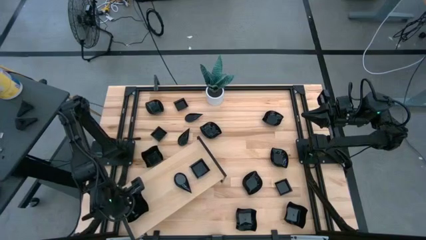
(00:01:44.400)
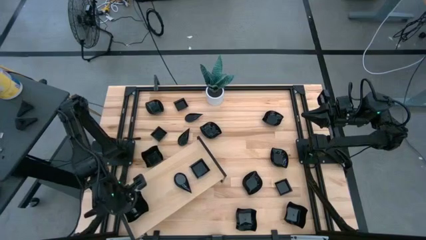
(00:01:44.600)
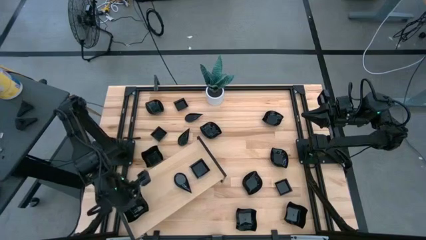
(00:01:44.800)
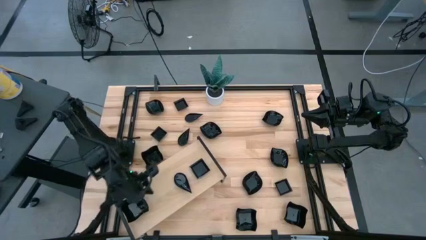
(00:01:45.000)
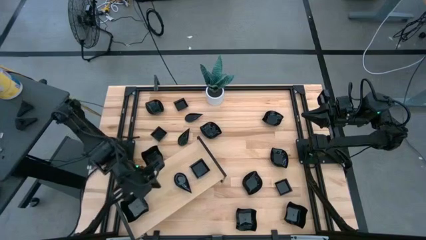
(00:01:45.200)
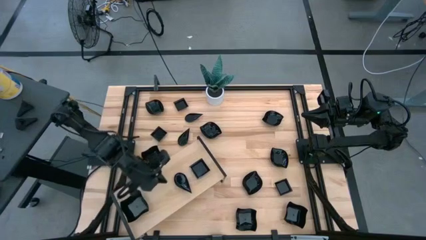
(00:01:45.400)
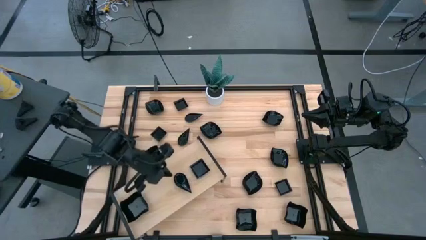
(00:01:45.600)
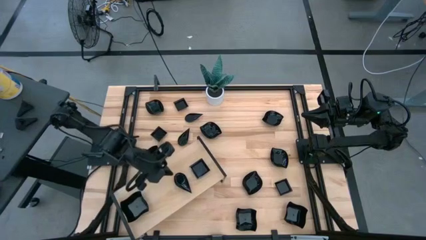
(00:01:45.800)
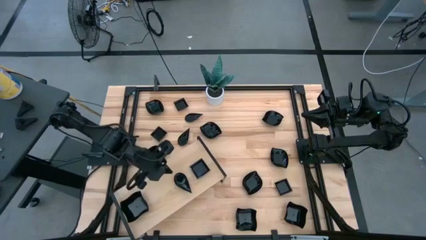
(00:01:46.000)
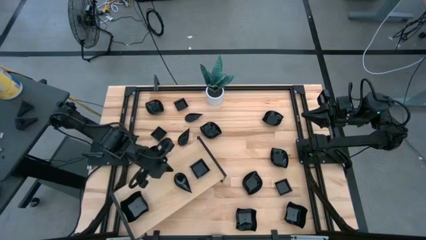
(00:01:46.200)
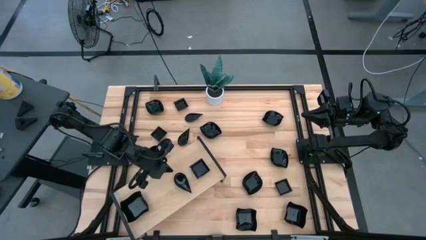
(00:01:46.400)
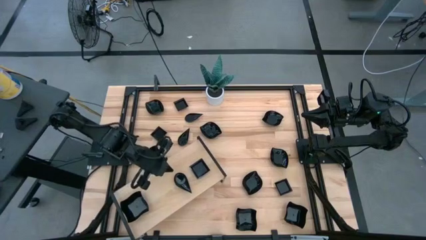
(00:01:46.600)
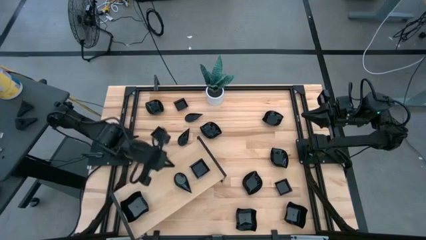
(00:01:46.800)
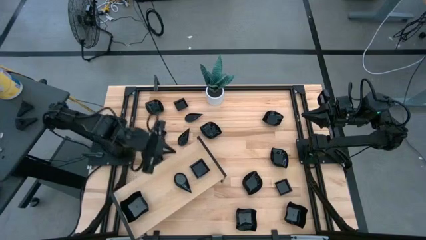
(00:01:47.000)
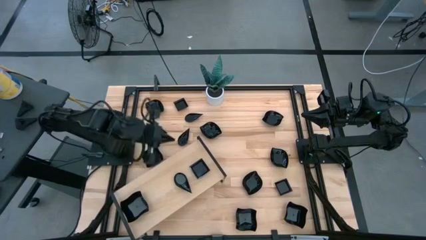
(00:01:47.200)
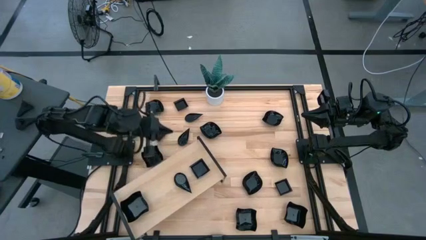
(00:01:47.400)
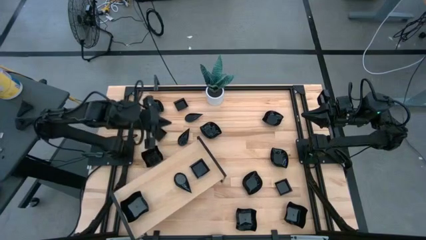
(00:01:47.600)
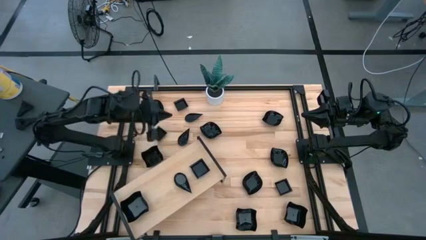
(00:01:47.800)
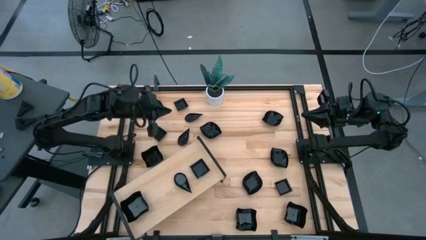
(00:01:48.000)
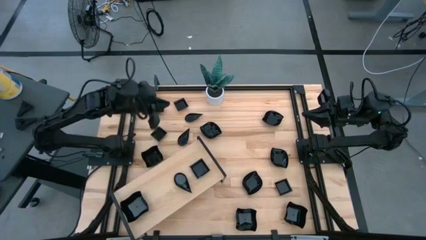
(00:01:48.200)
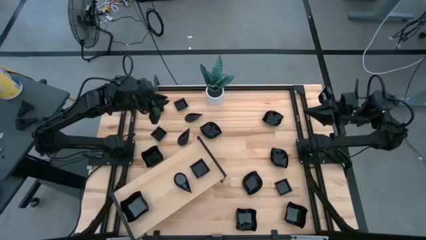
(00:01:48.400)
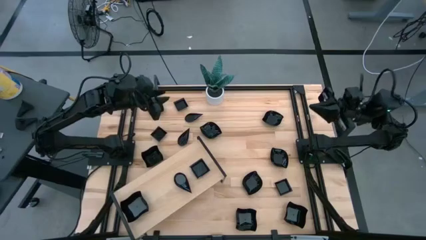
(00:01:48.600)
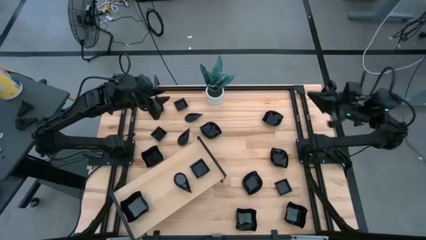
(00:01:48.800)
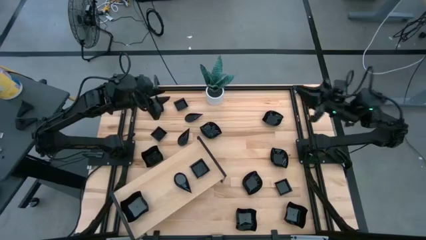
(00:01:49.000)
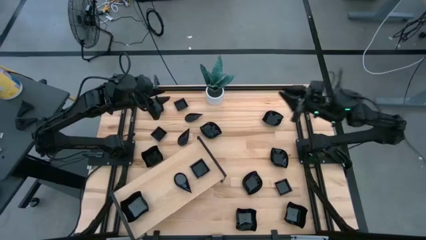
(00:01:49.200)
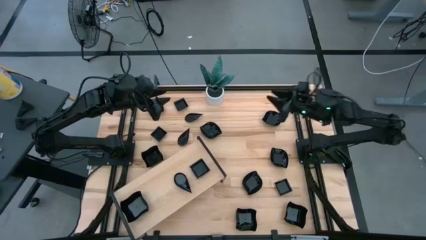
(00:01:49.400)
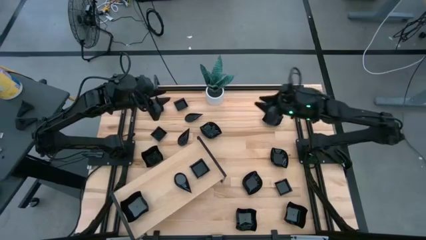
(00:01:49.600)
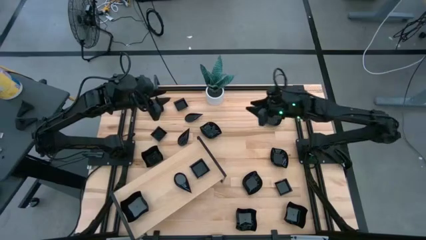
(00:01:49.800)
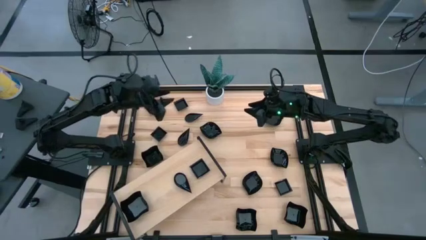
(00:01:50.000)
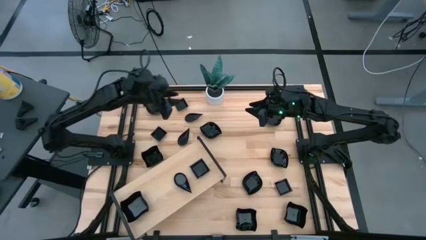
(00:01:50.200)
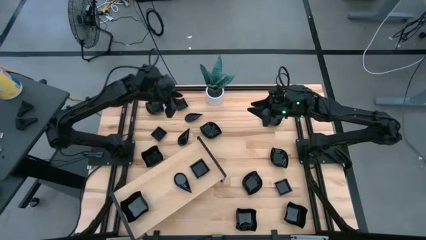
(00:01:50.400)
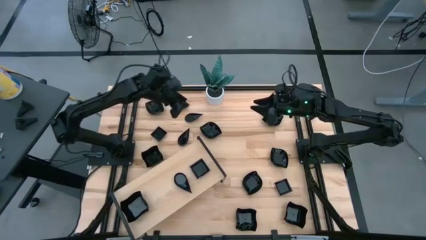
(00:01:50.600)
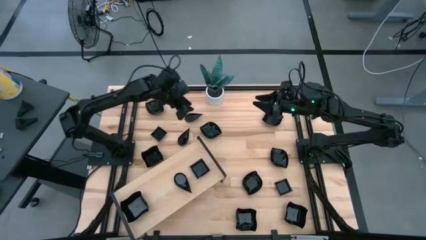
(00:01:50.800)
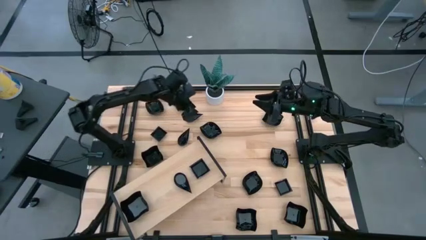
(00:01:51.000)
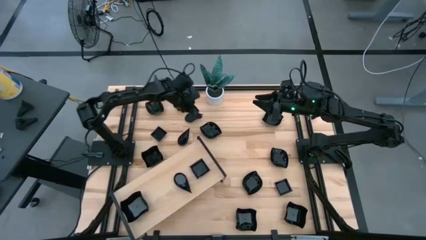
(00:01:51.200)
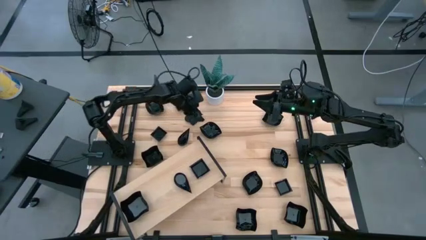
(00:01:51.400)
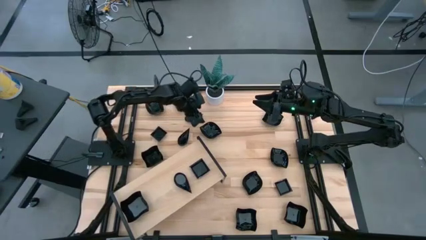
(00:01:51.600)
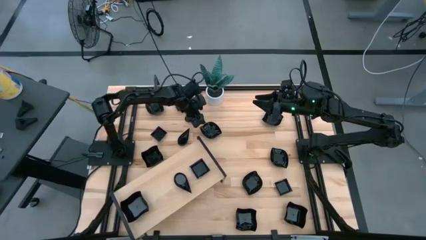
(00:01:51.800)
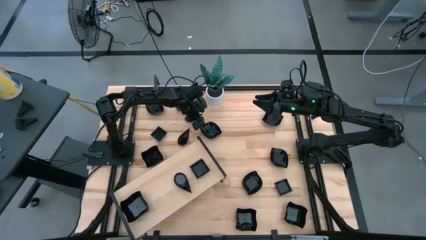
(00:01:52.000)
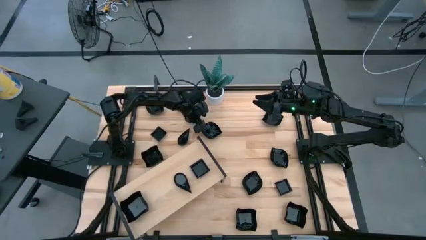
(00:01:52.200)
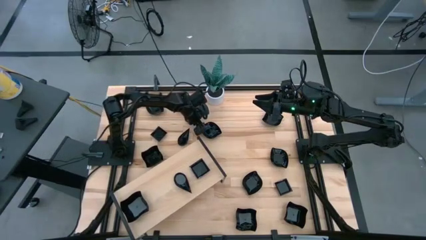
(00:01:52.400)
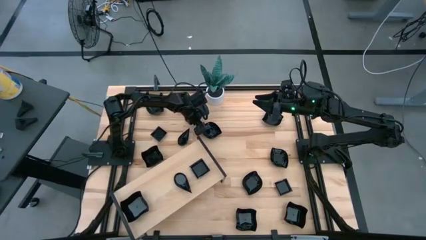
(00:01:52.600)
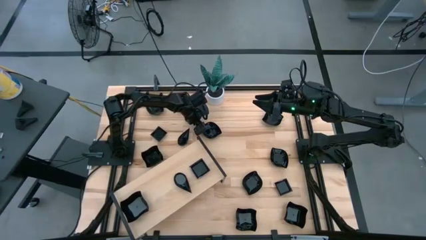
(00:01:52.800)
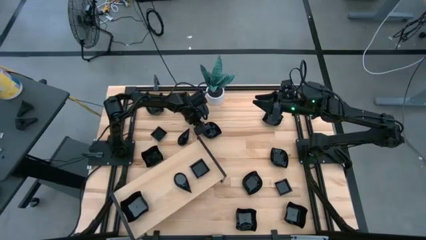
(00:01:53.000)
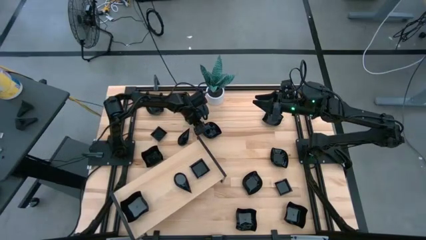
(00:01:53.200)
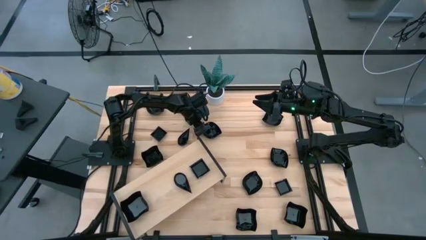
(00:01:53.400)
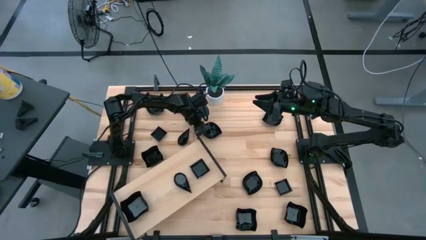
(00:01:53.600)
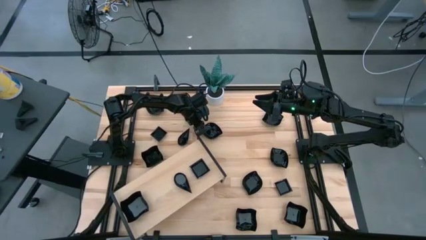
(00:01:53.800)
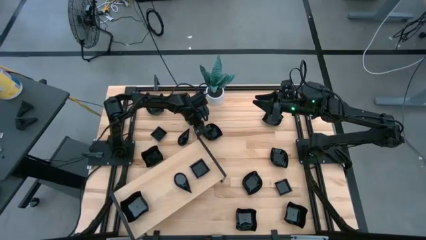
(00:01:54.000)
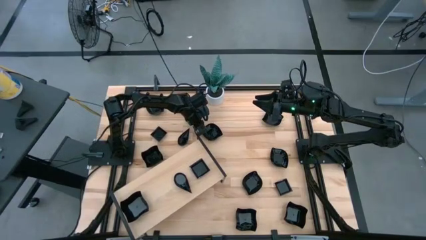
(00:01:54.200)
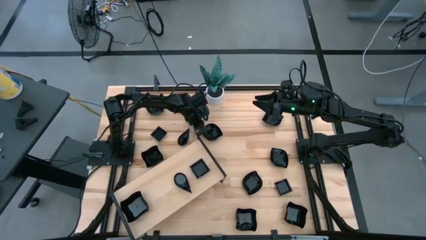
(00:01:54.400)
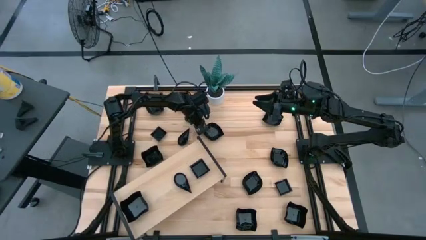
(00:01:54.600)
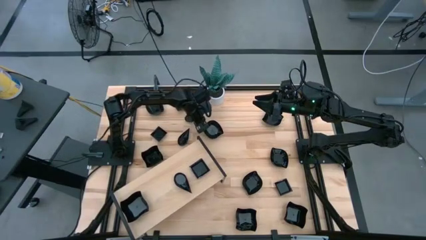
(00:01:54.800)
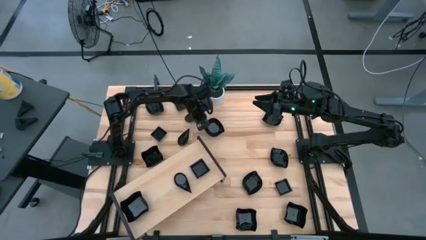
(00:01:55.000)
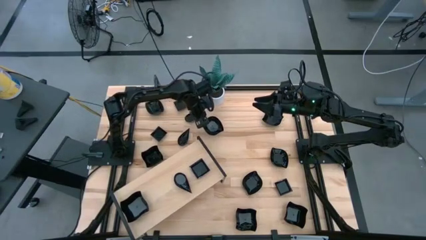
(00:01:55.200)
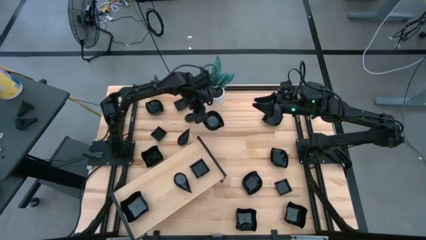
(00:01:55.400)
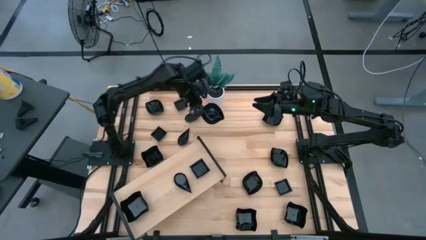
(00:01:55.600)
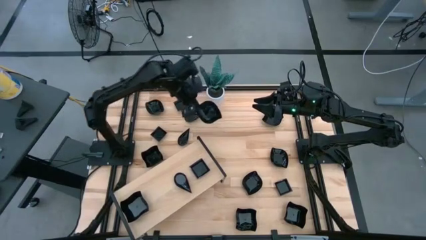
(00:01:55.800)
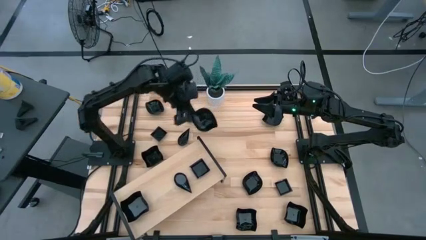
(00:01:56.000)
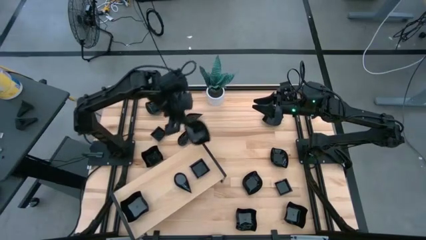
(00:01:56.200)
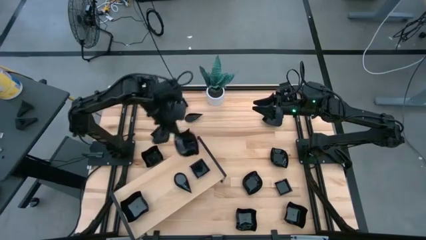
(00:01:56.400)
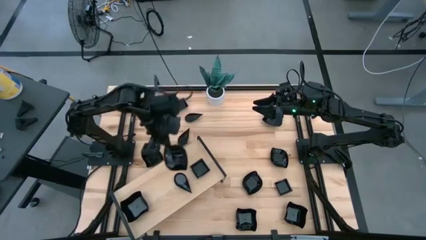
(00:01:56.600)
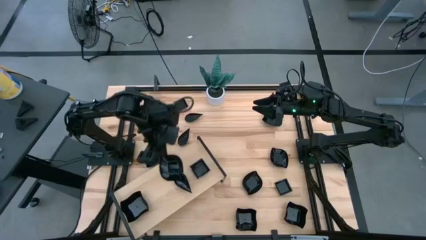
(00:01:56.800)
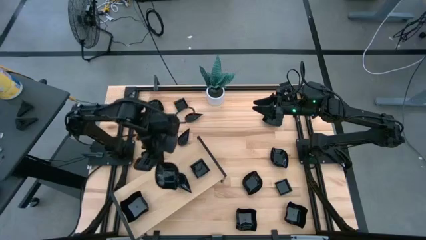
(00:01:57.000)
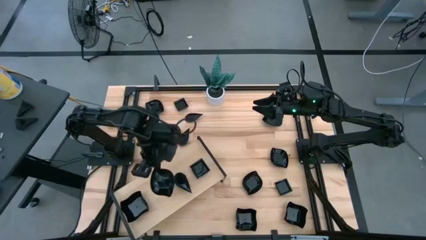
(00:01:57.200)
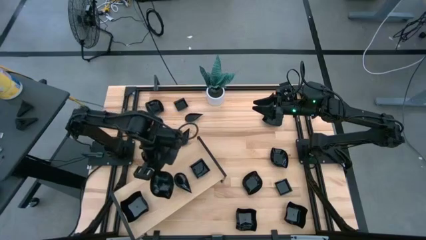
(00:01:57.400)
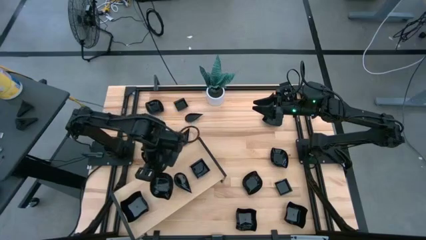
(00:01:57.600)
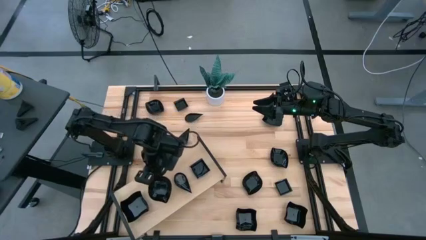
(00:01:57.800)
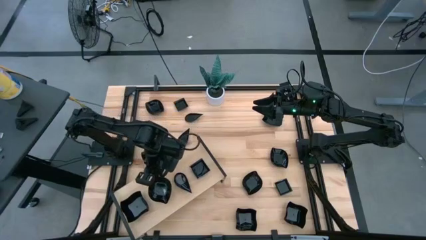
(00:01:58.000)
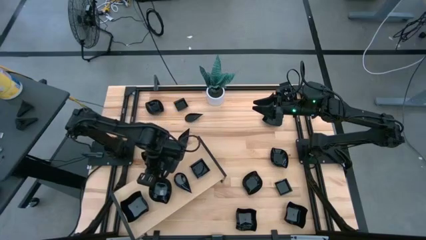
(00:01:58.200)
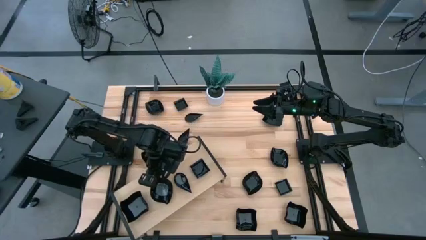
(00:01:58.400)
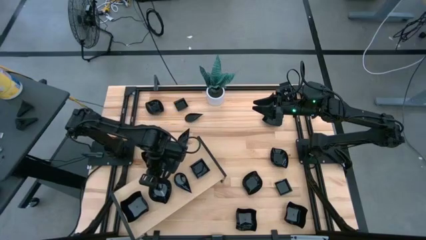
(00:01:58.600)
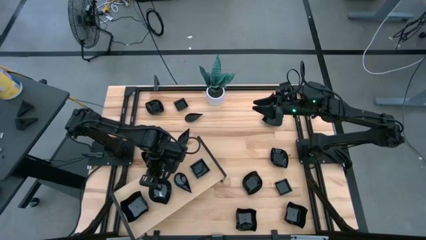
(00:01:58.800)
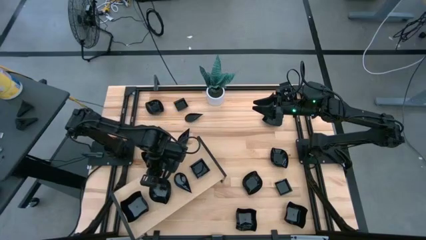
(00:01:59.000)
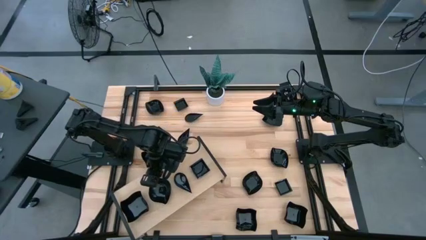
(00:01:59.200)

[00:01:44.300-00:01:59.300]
Task: Pick & Place Mini shaped plates
Put the black leaf shaped plate on the shelf
